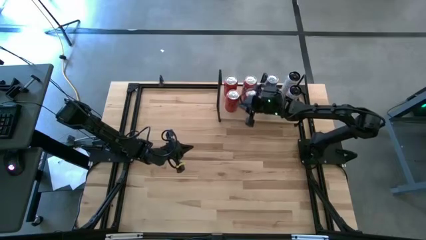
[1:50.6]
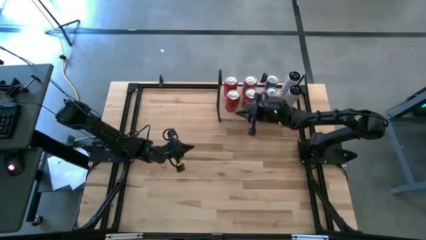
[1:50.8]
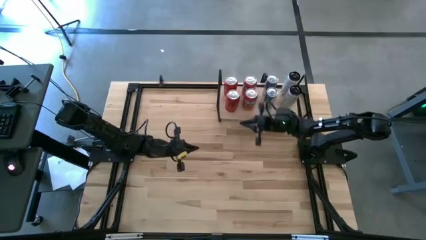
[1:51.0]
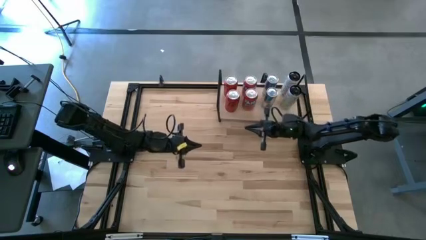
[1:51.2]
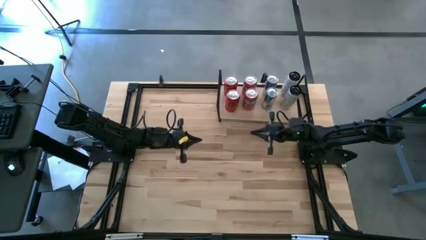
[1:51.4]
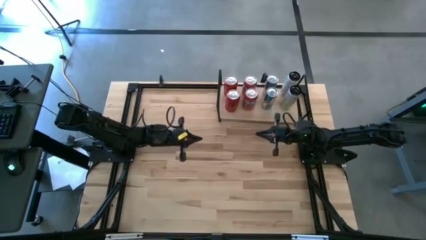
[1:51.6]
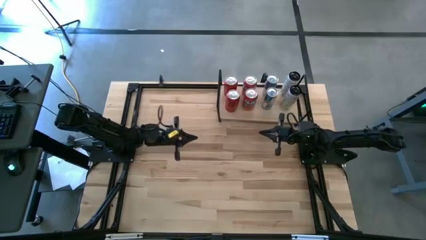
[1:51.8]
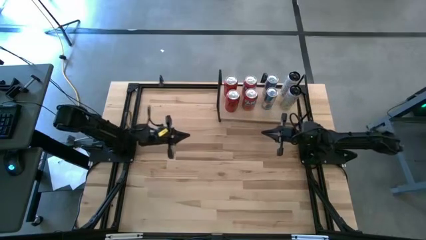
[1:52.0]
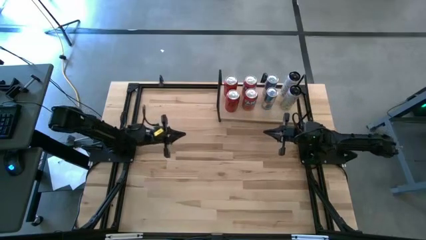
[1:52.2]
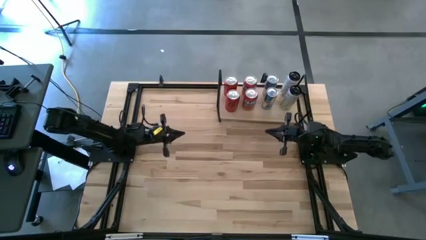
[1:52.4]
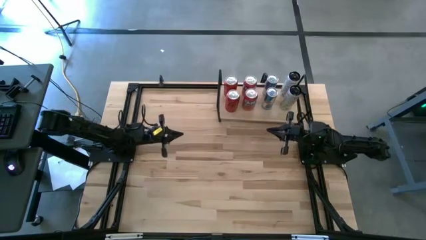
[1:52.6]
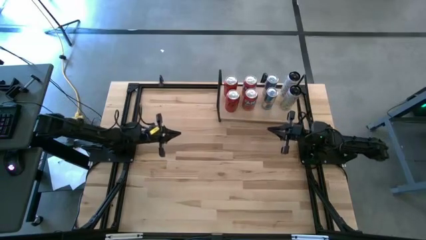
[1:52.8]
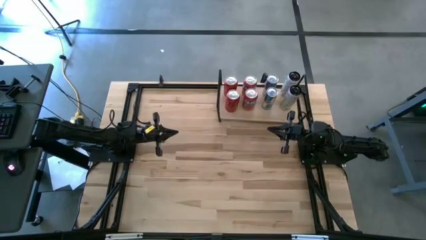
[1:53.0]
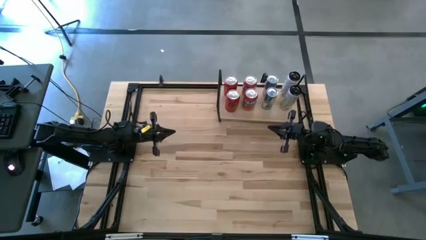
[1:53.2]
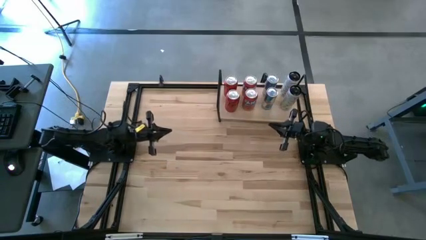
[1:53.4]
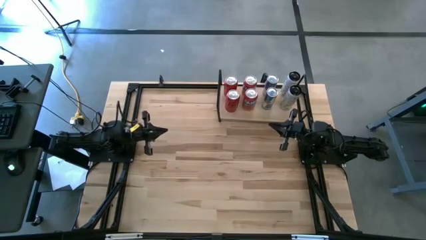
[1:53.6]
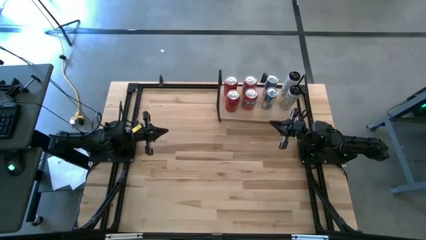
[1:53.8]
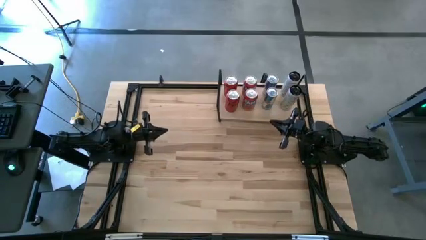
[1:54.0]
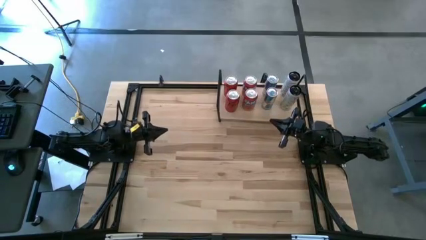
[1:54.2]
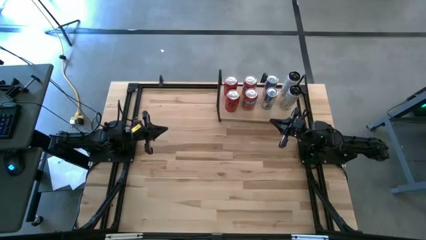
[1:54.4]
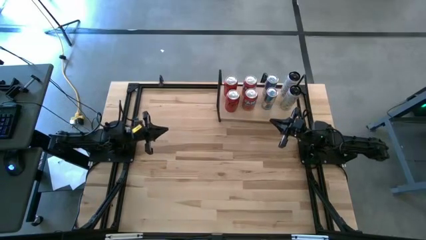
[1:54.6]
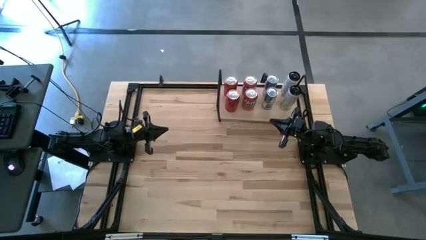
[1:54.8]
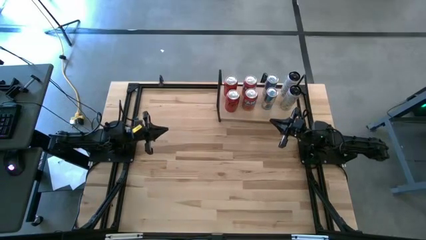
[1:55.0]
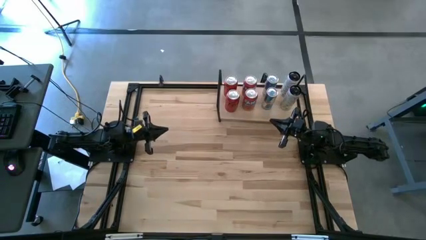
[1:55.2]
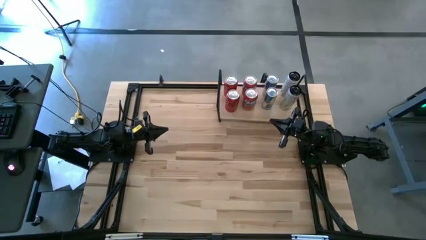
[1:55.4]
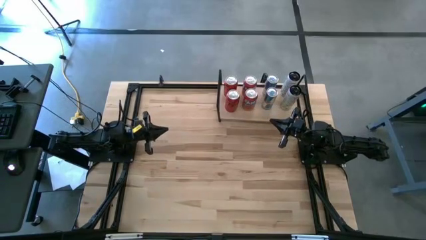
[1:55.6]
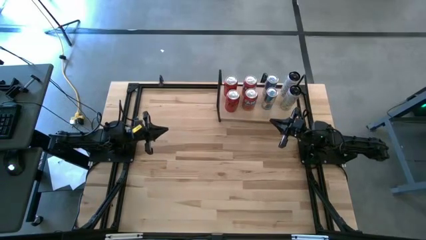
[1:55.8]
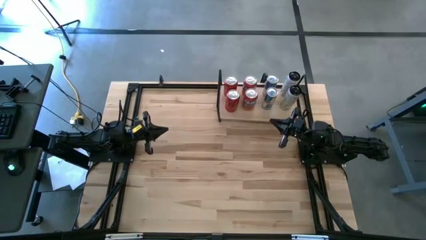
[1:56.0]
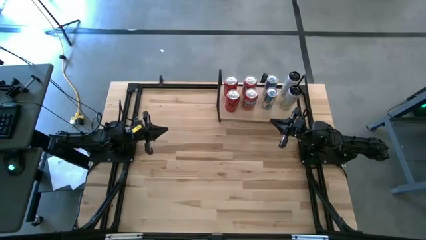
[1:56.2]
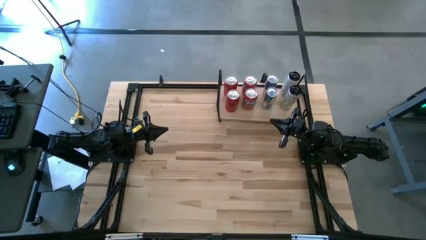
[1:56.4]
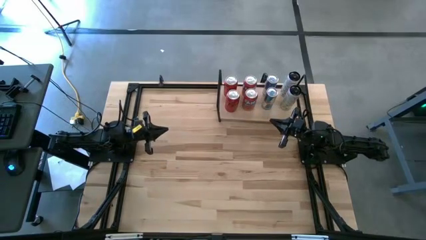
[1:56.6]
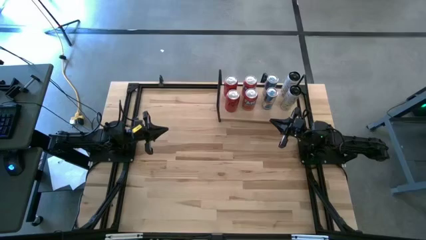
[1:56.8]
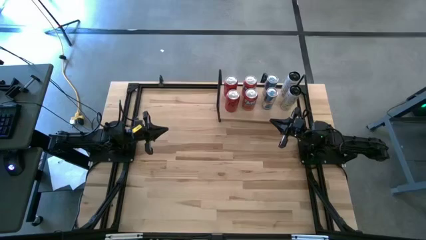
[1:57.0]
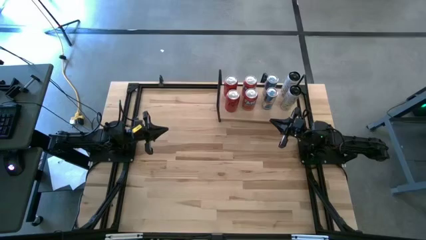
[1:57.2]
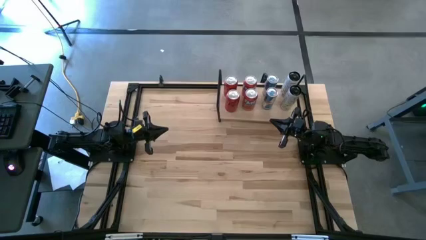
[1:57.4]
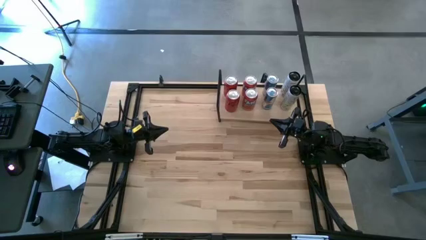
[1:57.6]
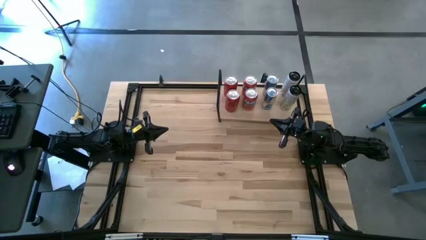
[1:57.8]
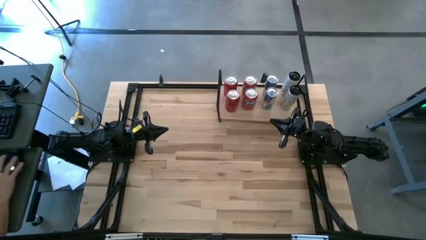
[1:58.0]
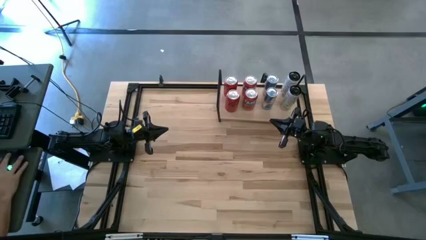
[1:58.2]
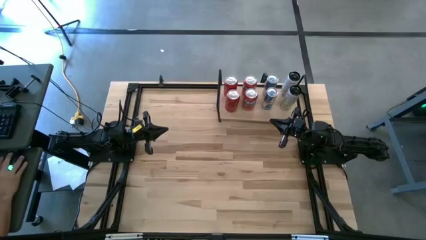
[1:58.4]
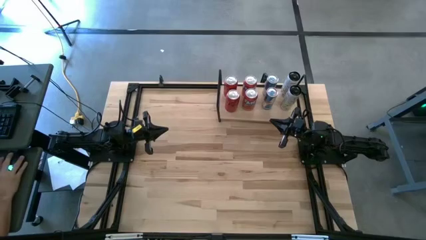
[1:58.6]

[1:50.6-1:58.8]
Task: Place canned beverage on shelf
Return to Home Position

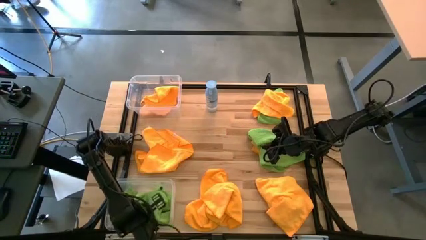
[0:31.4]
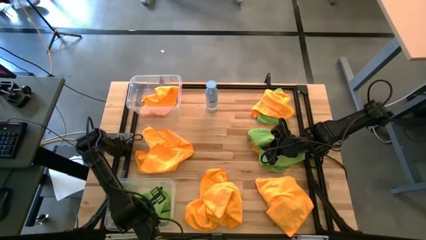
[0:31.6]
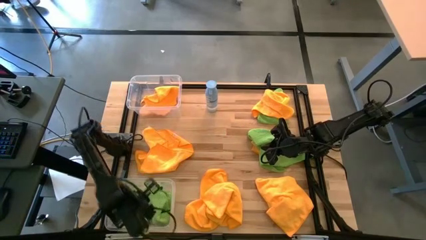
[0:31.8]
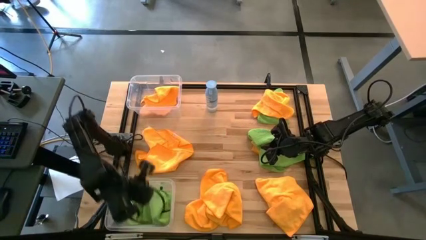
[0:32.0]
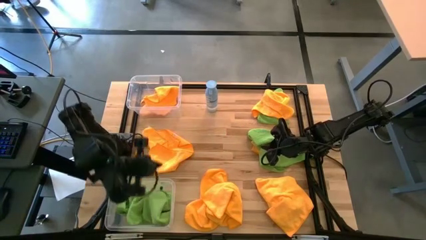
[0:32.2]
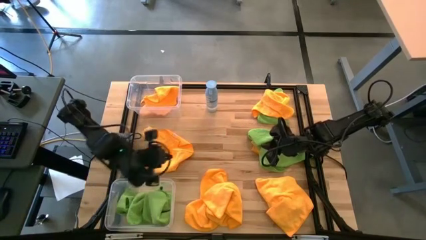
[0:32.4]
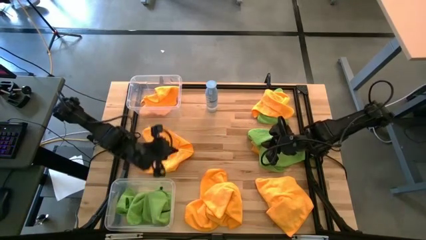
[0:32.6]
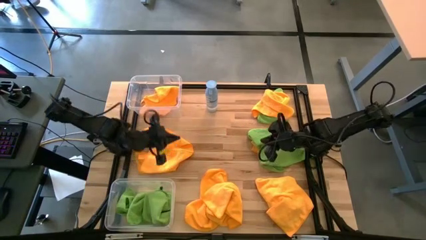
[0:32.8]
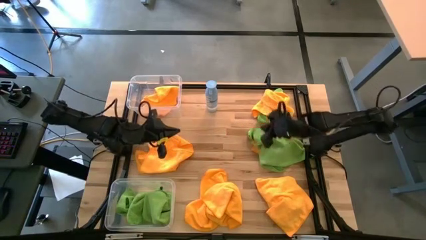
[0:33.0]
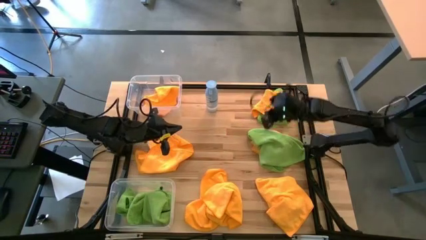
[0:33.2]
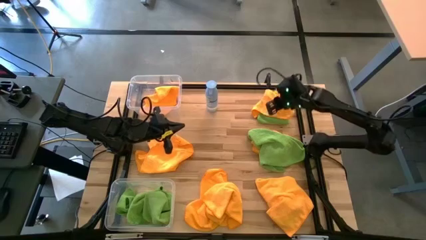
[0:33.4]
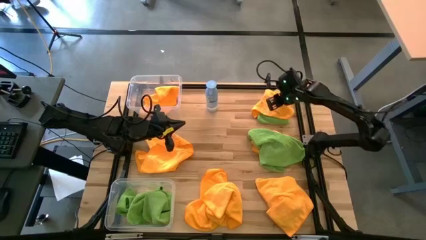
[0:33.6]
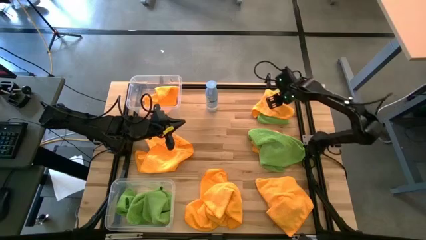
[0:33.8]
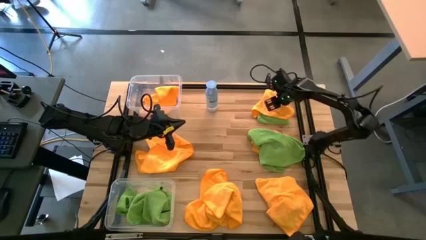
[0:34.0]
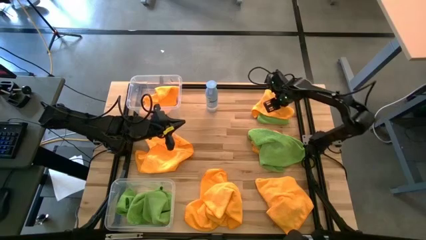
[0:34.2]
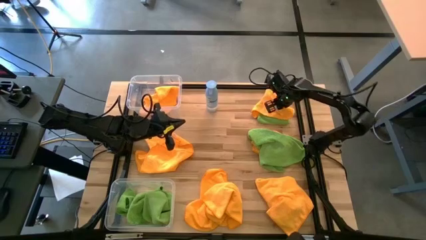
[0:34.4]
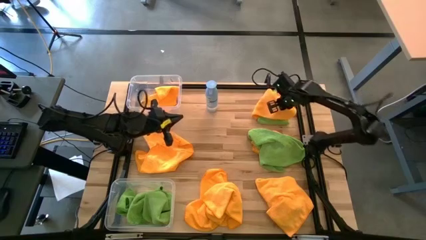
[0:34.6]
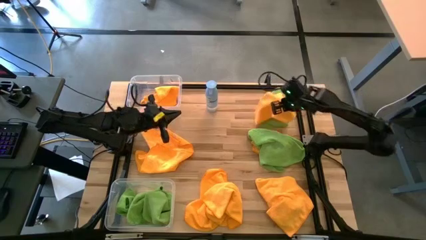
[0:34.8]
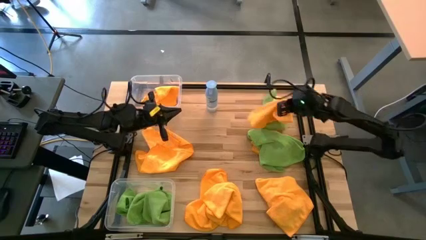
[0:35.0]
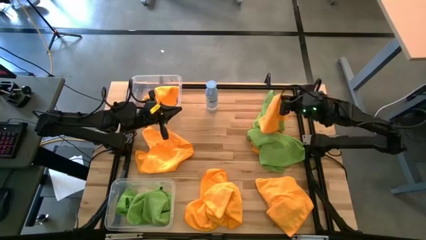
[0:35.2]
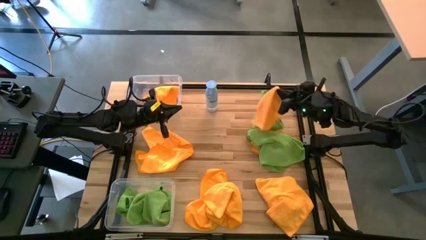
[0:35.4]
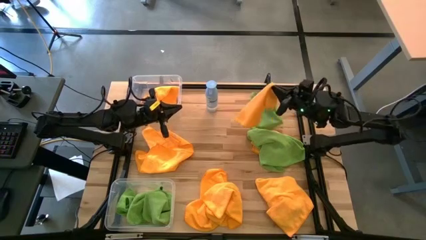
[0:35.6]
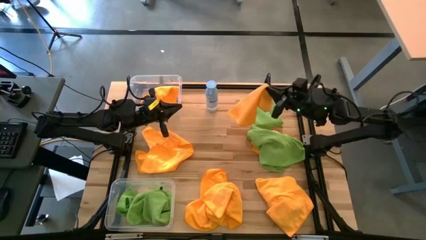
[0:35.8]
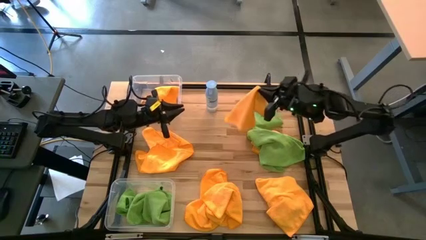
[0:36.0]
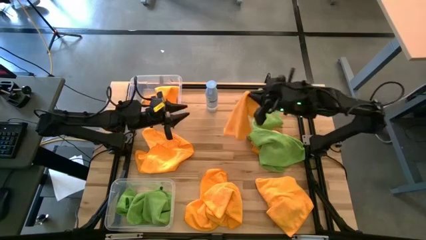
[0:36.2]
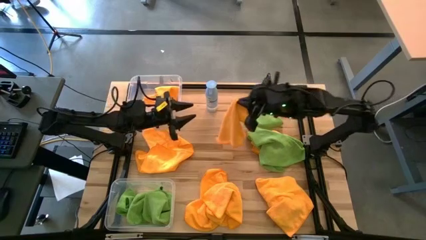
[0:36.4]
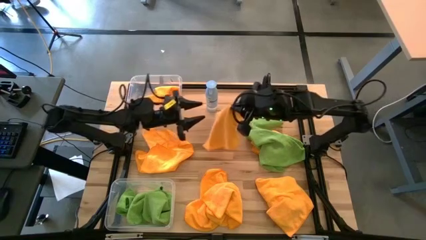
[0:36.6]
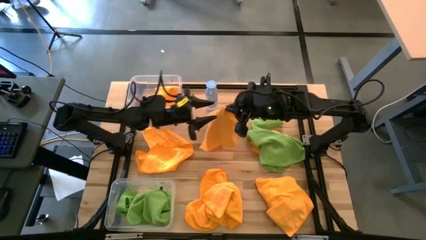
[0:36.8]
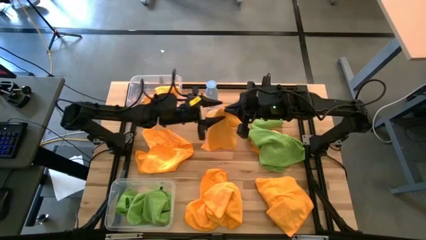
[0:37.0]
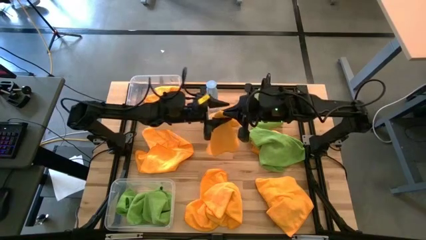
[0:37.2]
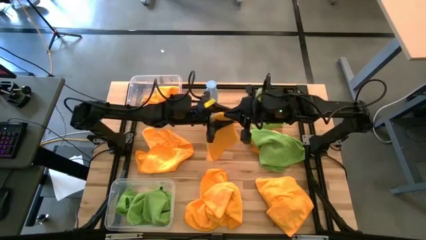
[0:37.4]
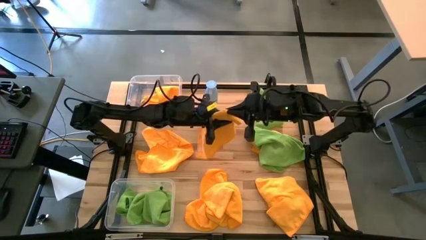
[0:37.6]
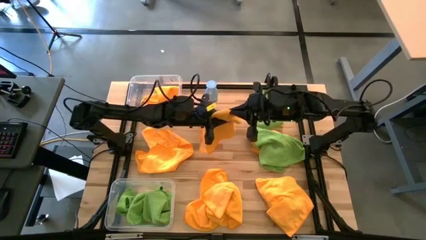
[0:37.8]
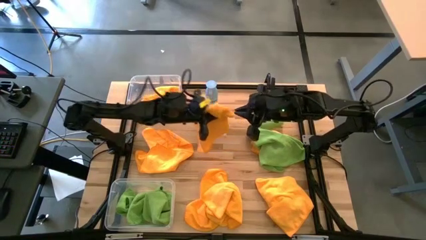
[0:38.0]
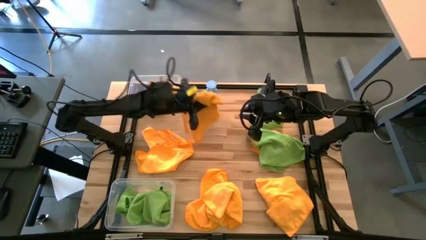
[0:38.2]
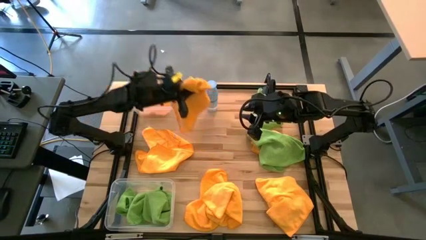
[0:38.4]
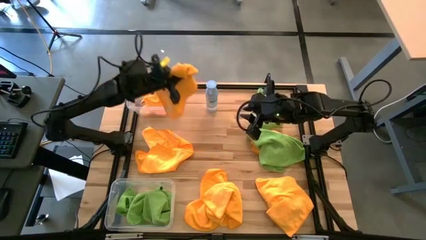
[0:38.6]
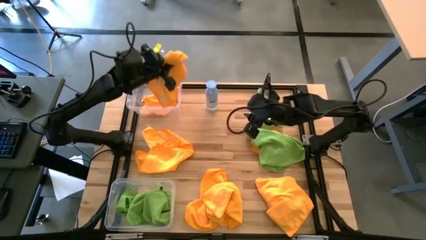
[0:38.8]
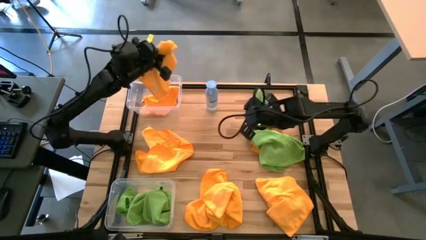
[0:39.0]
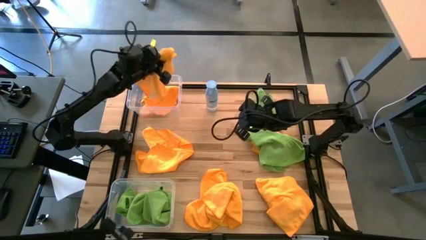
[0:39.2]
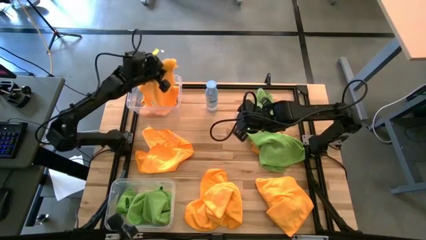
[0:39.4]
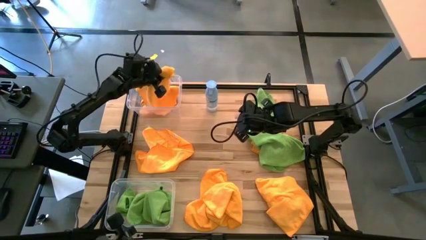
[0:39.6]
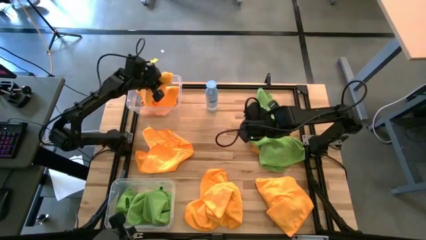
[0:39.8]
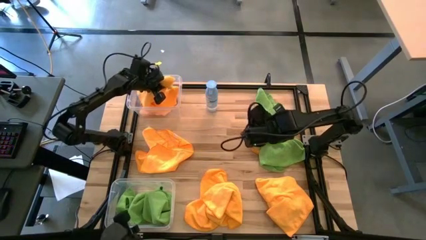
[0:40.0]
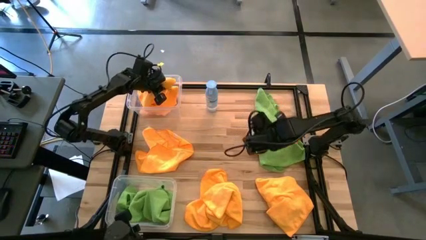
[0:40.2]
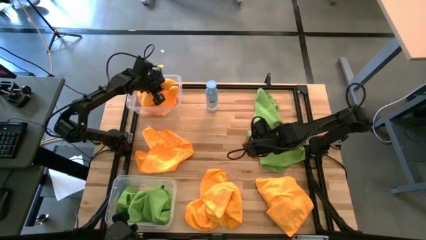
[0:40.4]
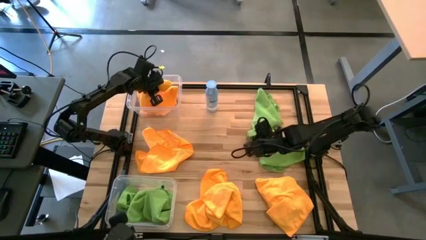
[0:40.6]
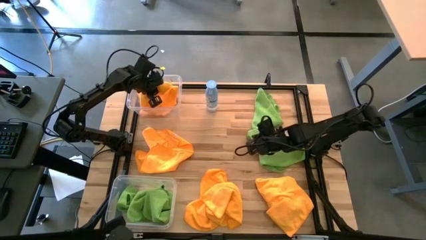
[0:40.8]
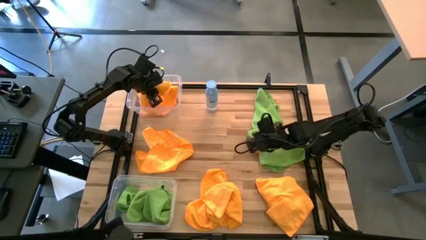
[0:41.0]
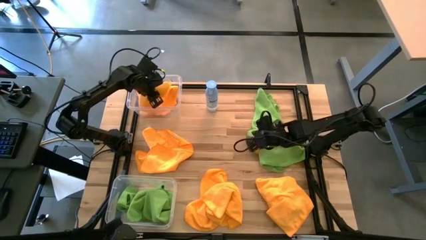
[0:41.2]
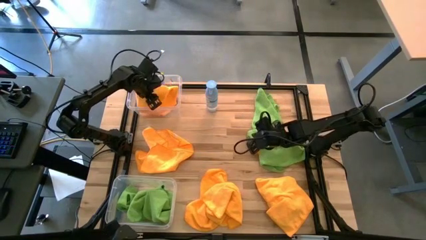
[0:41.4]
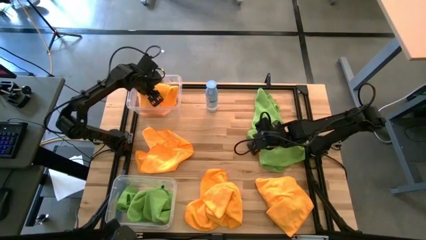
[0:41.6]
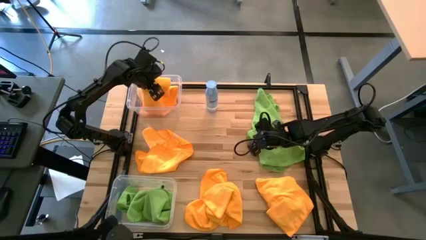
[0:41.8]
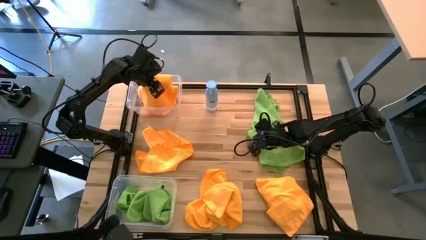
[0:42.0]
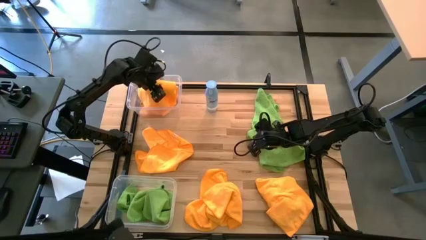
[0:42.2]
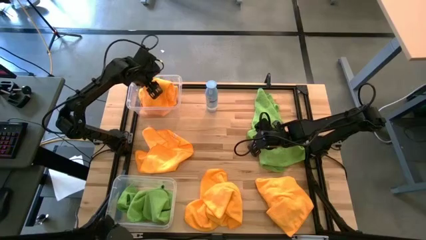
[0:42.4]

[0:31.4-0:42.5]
Task: Sort microfiber towel by color & place in baskets
Put the yellow microfiber towel into the top transparent bin
